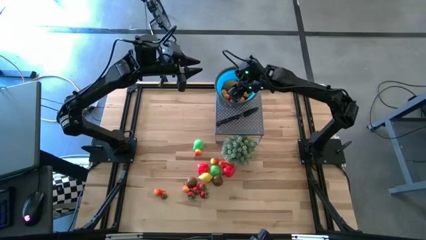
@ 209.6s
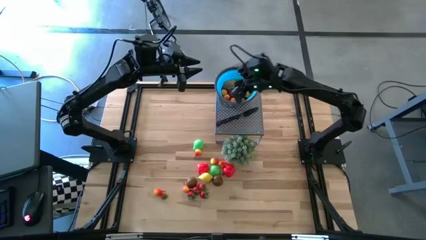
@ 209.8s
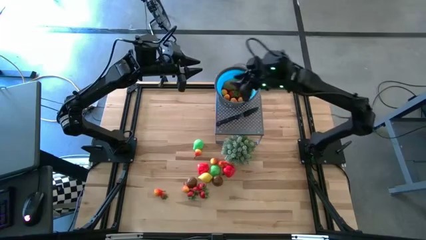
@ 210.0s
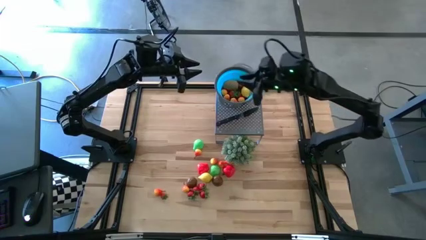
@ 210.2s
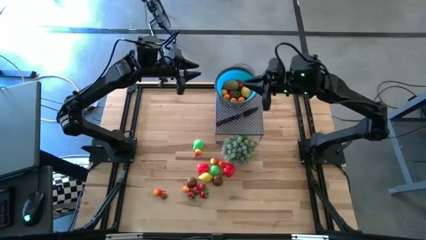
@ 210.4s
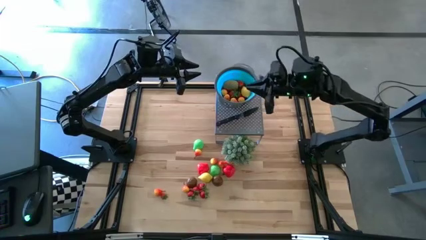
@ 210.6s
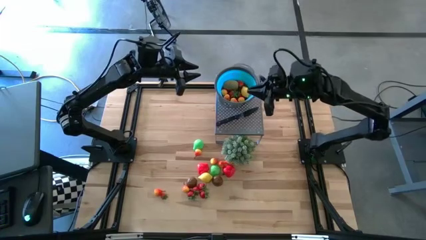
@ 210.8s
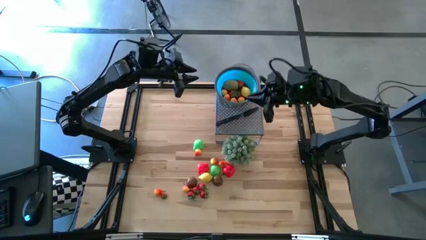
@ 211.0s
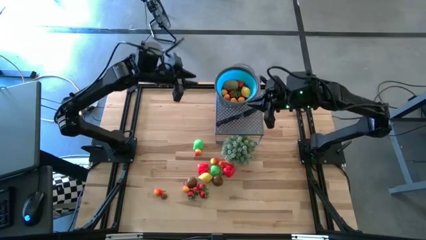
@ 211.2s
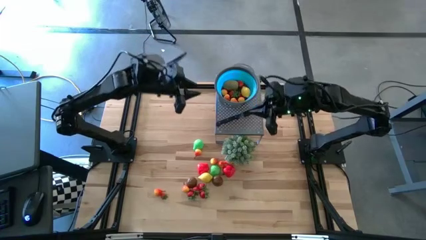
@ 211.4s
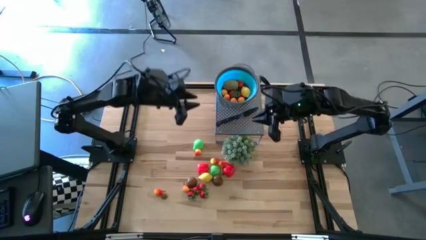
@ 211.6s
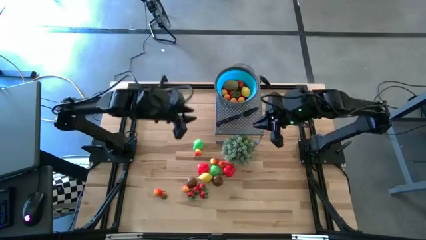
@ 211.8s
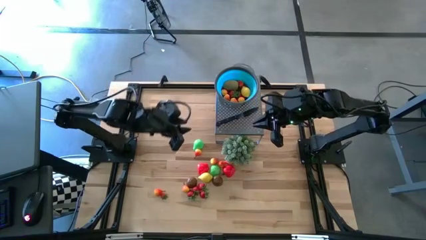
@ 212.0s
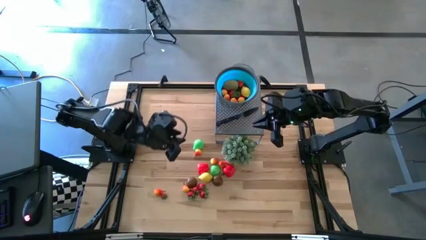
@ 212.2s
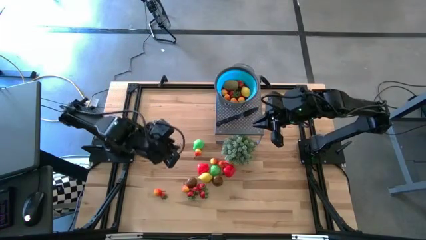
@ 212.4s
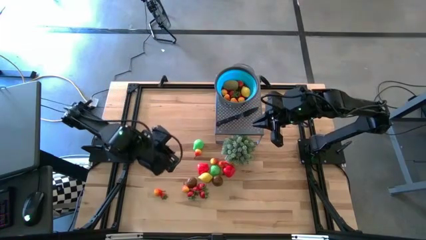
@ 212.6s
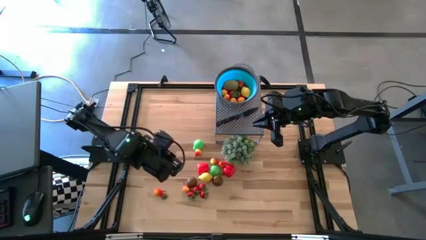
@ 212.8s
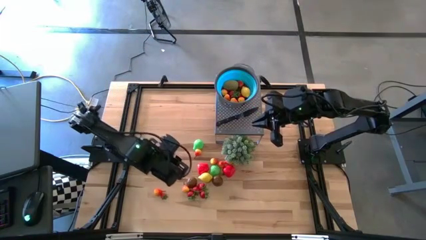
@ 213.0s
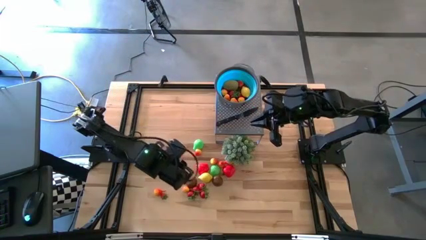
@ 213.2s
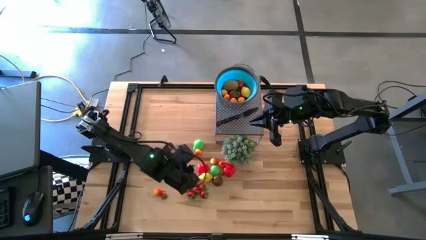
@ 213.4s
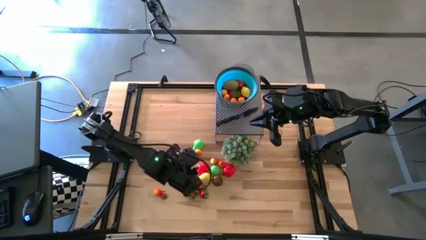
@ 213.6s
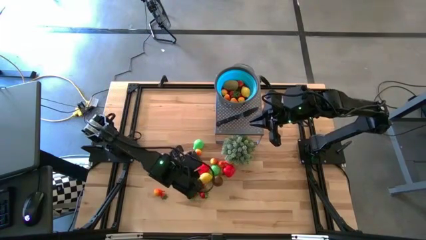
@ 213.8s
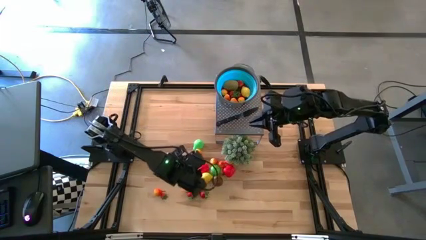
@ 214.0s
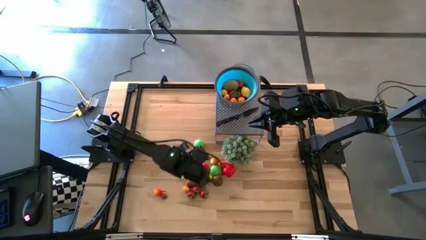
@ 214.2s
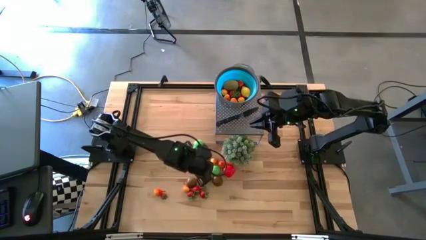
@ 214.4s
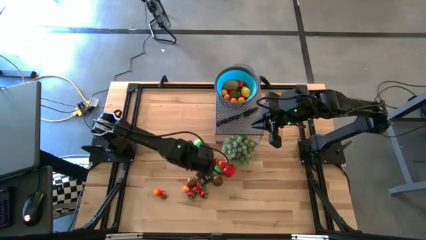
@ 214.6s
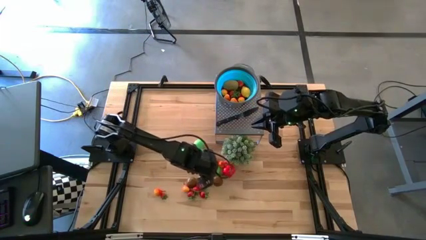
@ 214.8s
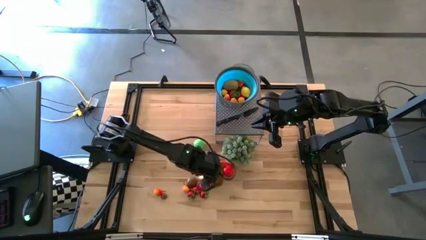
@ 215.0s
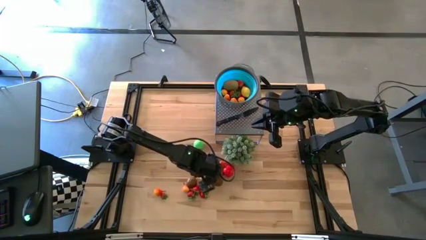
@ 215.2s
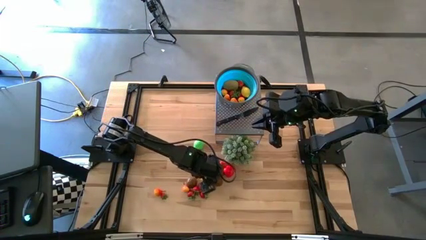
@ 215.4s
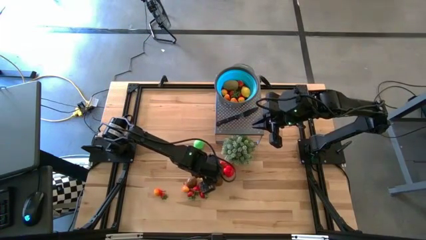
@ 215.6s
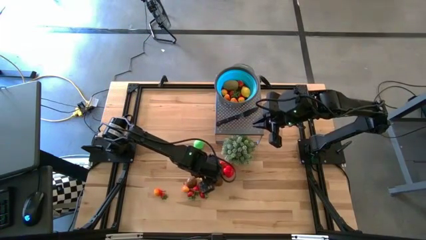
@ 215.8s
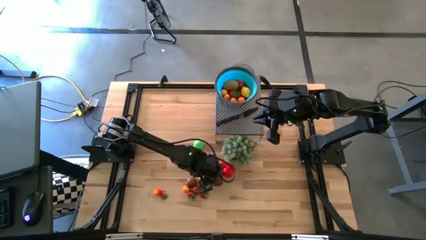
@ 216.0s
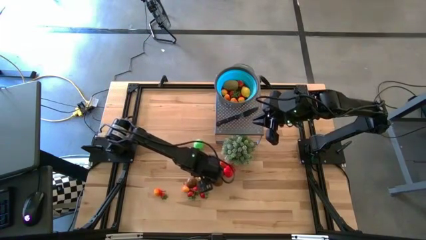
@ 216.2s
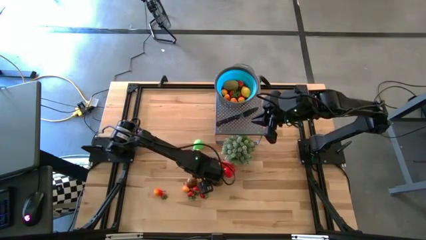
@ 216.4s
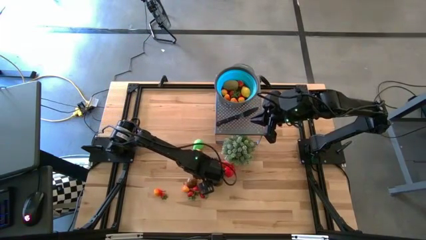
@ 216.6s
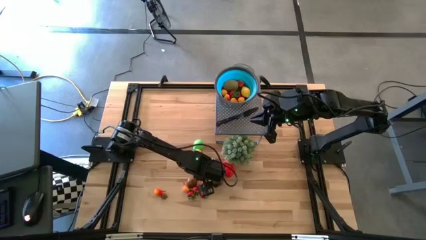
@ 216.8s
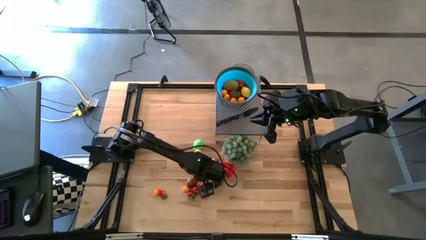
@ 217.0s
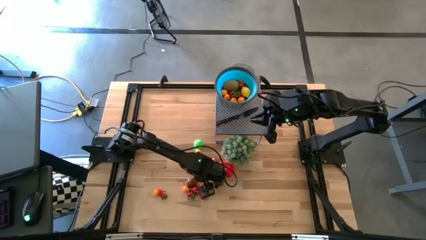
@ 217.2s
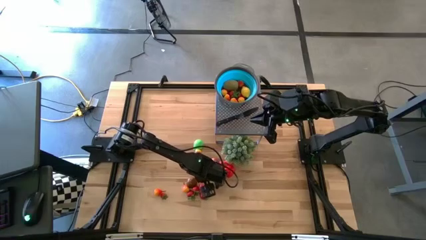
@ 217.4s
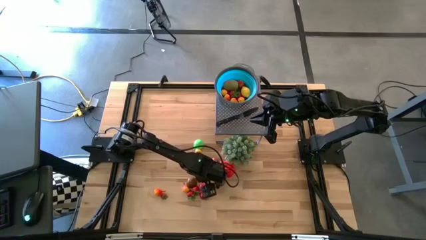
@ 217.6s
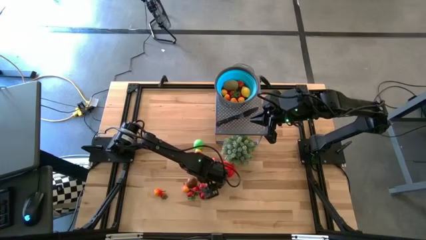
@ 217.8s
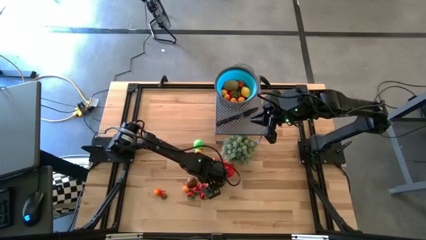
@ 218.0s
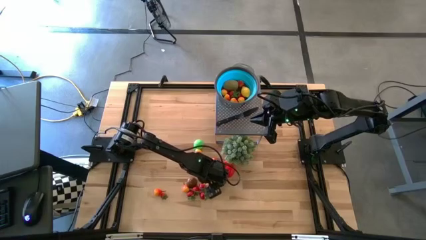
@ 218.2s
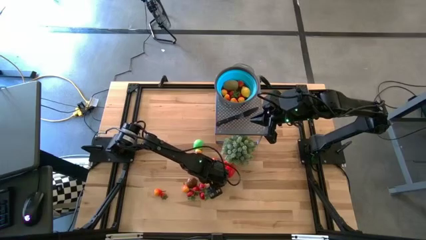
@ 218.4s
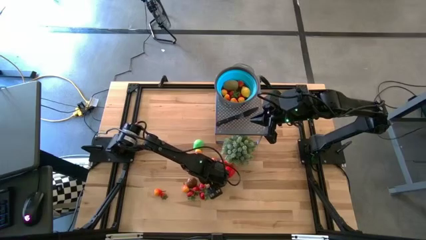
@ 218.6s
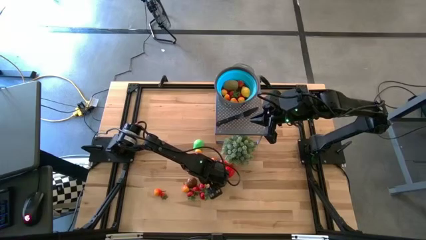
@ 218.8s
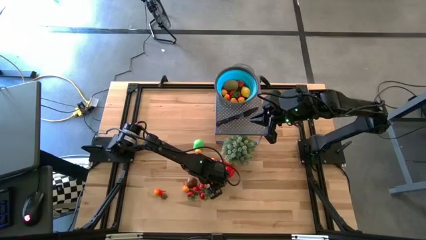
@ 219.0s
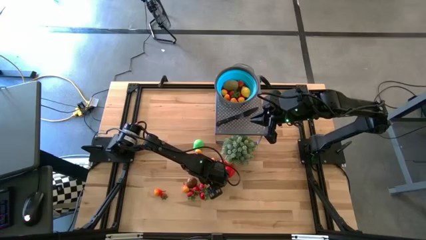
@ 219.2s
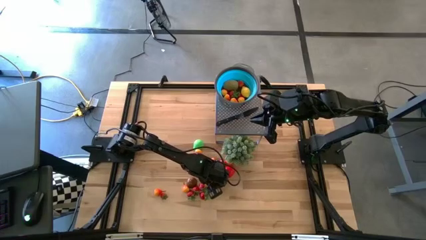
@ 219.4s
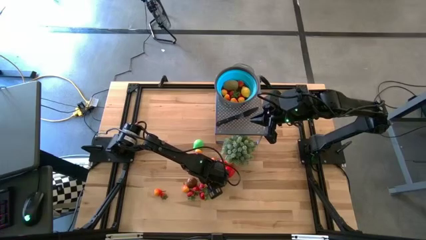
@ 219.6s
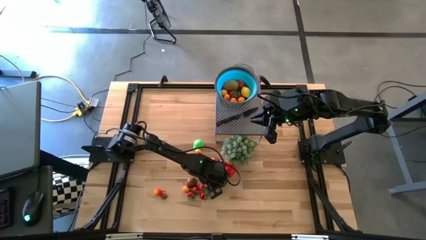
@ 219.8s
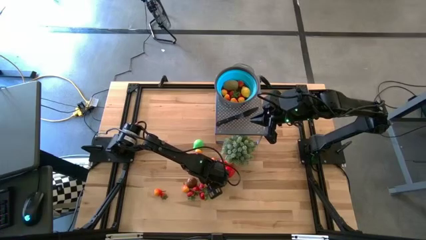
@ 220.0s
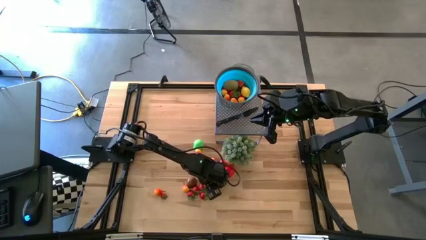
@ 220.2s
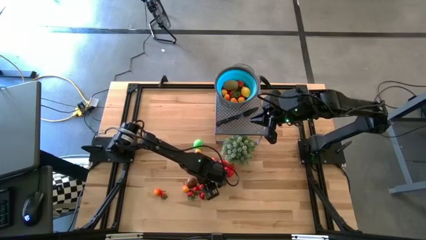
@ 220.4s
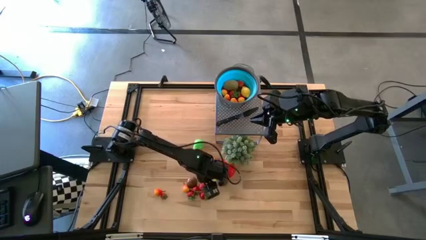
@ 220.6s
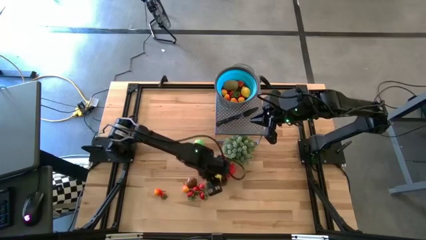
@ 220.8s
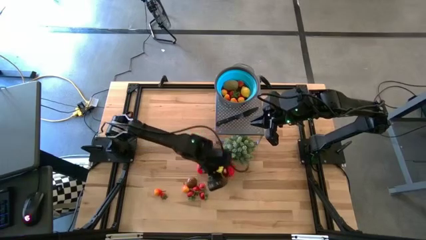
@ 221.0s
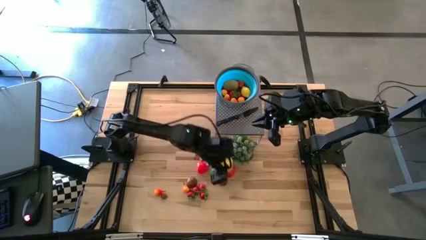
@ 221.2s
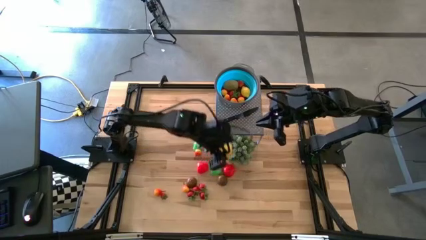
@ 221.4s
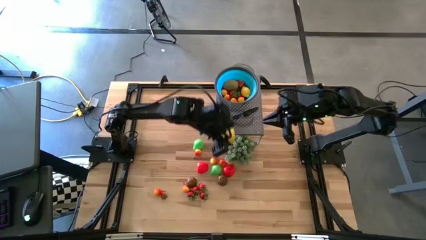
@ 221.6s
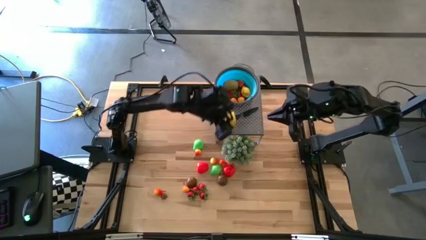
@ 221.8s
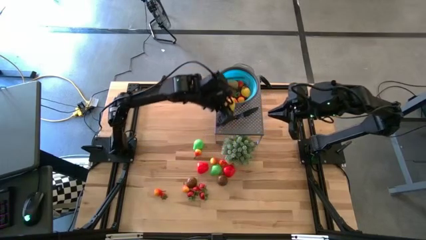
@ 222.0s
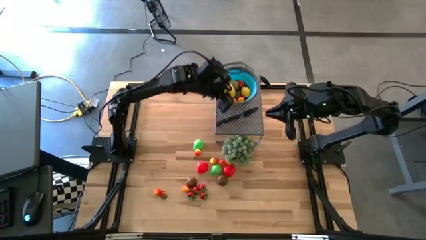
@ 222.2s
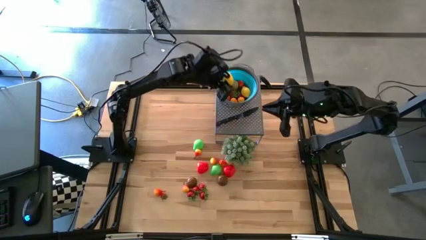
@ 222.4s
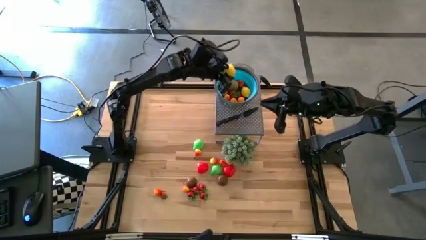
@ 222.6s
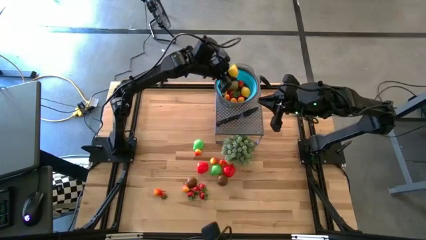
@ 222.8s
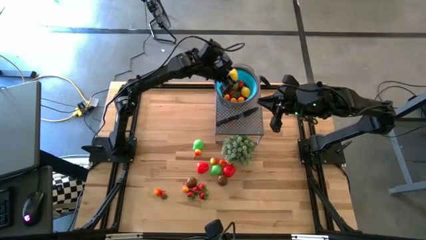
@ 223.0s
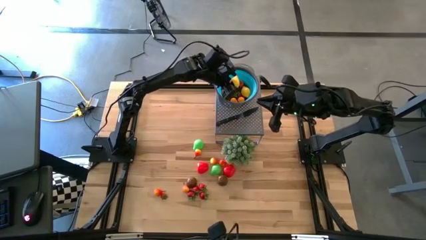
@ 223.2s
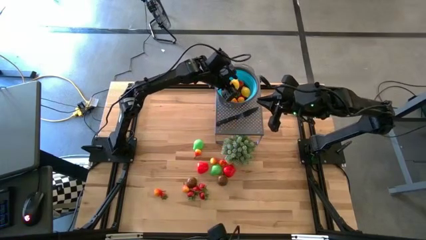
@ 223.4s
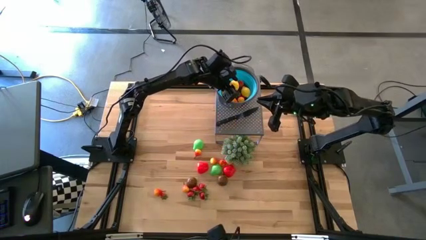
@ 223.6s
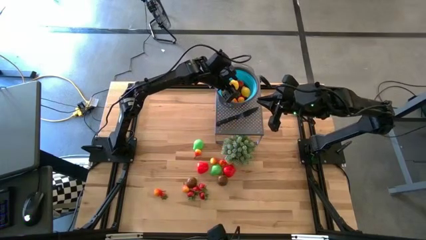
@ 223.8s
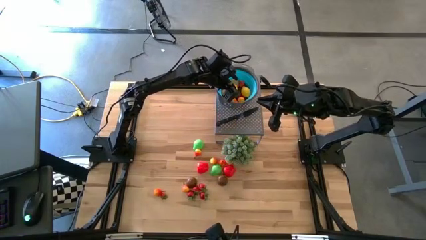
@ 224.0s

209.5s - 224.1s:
Task: Pick & Place Fruit
Put the yellow lemon into the blue strainer bowl

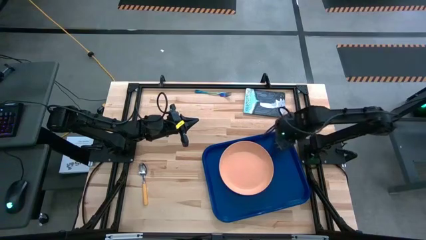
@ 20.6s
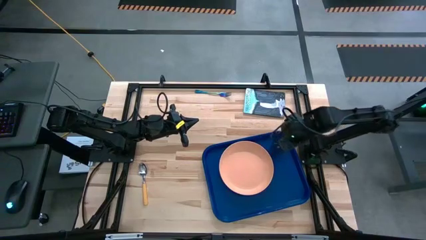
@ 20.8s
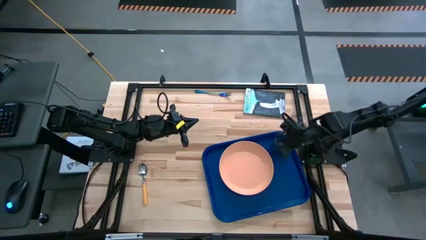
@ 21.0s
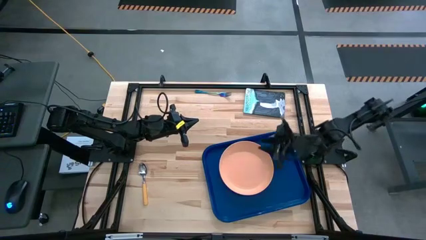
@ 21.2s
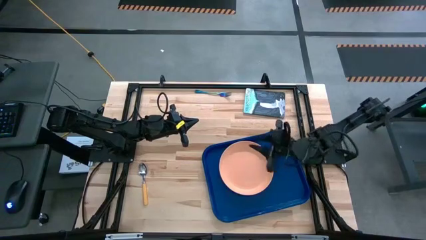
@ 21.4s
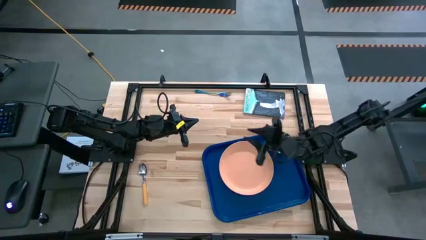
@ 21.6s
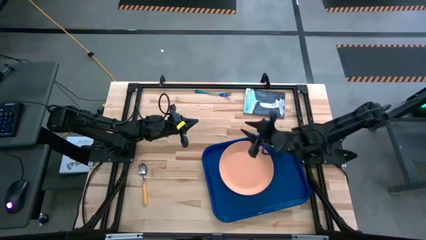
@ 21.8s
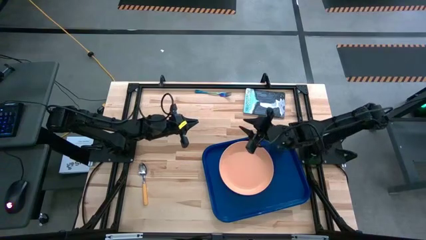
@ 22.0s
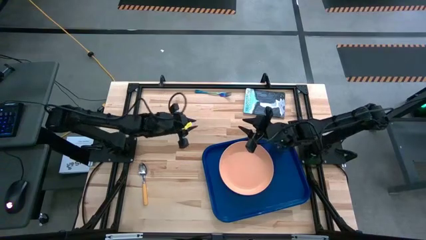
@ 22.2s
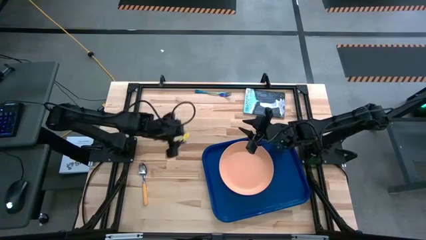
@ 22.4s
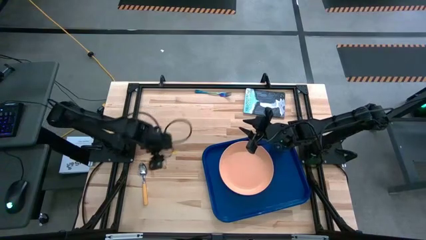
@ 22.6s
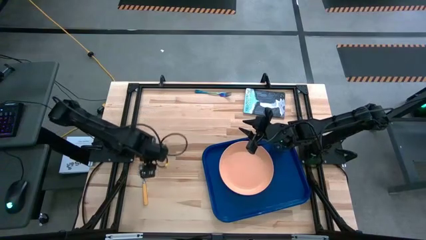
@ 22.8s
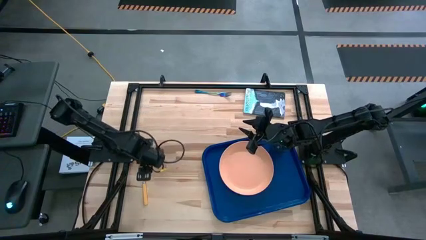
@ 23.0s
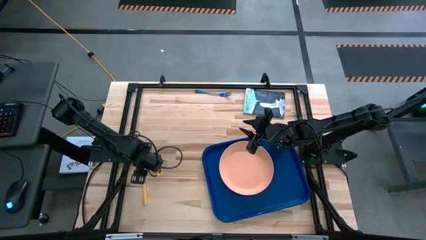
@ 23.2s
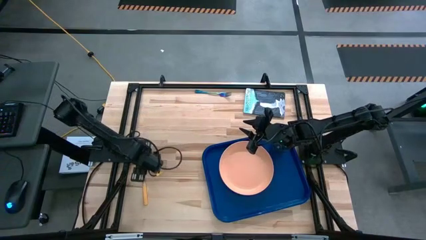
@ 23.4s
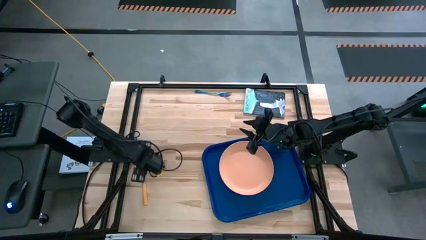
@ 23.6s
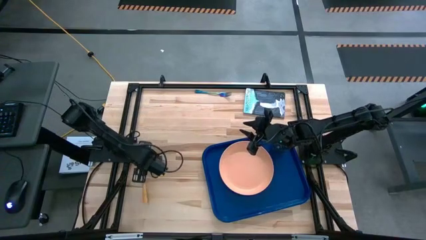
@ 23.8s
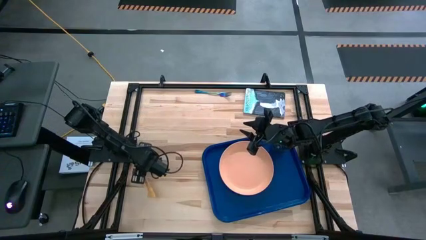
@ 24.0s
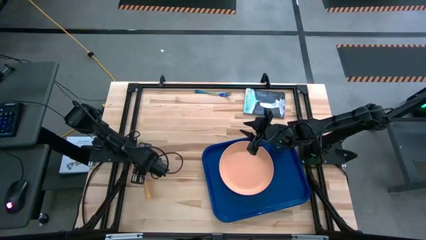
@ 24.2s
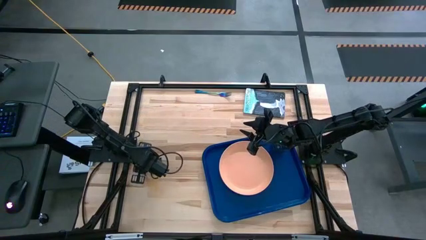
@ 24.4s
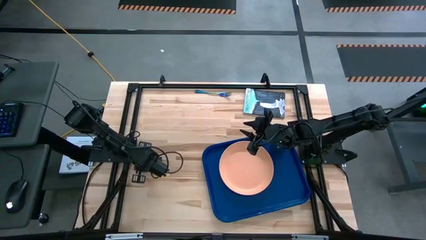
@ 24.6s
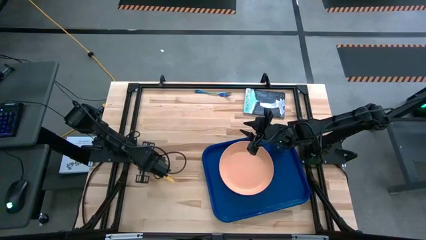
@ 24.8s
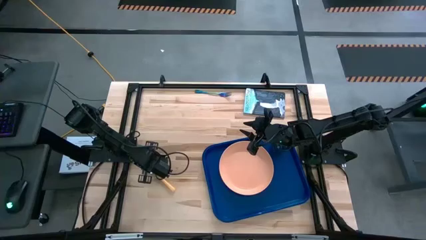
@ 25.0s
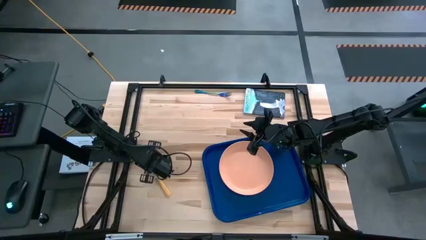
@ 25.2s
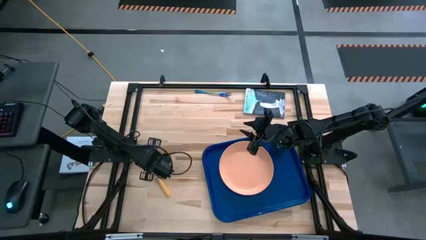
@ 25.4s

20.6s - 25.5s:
Task: Pick and place plate/cup/fork/spoon on tray
Put the orange spoon on the blue table tray to the left of the orange plate
